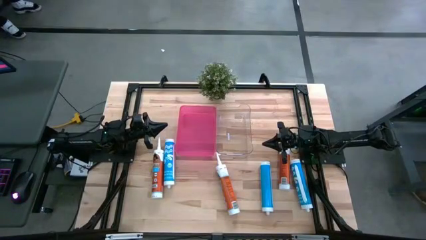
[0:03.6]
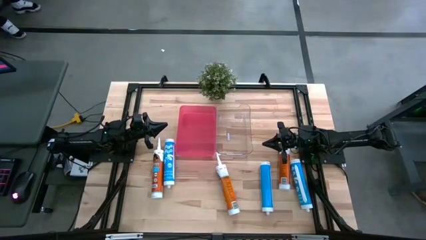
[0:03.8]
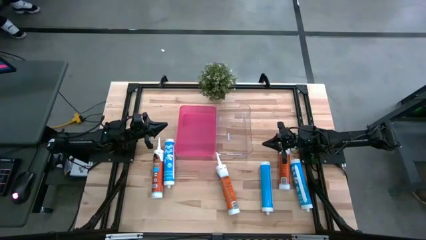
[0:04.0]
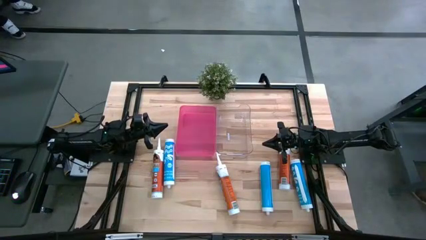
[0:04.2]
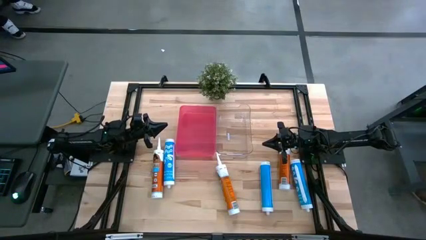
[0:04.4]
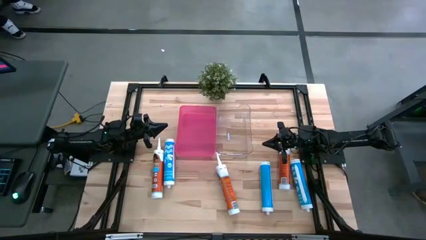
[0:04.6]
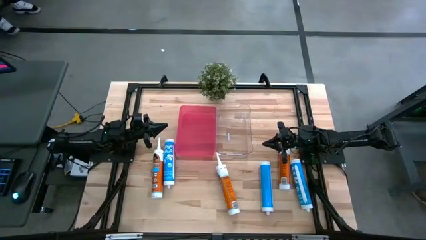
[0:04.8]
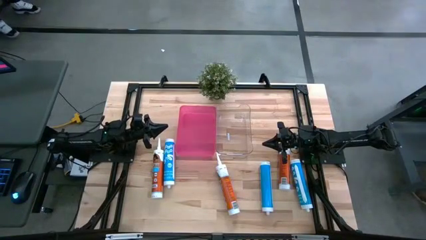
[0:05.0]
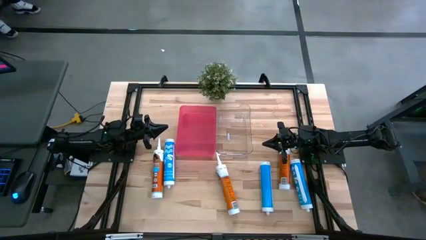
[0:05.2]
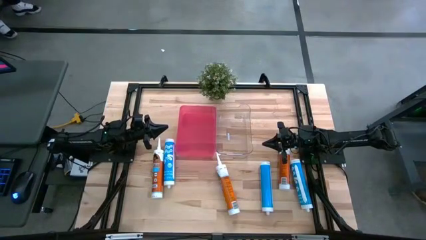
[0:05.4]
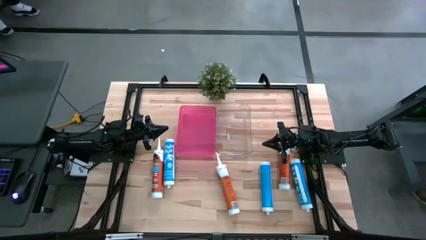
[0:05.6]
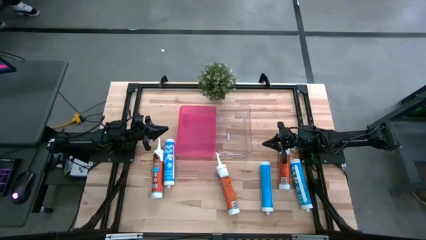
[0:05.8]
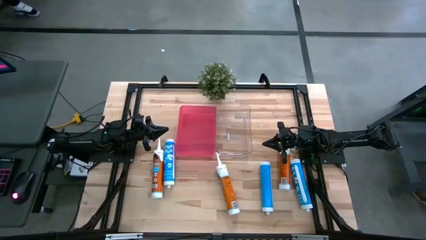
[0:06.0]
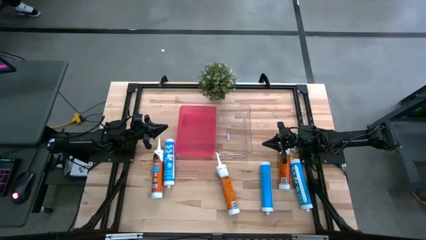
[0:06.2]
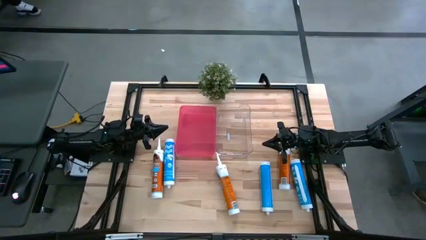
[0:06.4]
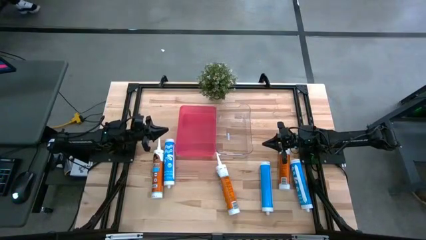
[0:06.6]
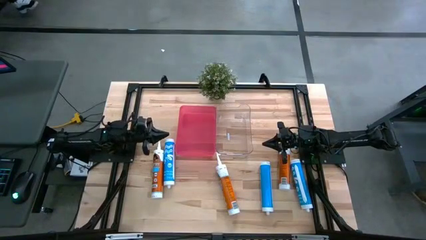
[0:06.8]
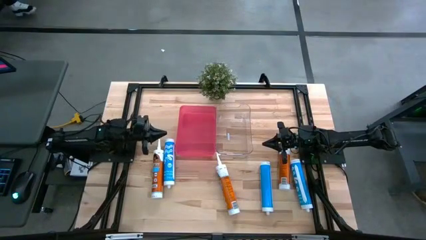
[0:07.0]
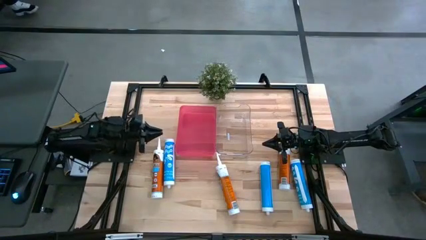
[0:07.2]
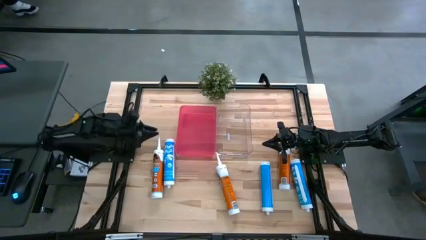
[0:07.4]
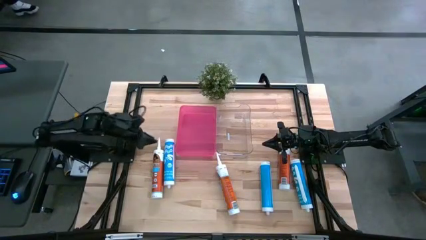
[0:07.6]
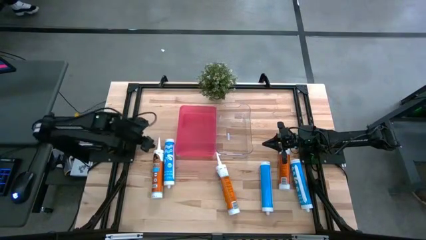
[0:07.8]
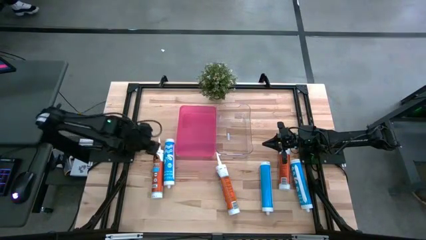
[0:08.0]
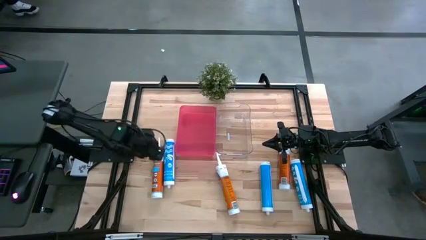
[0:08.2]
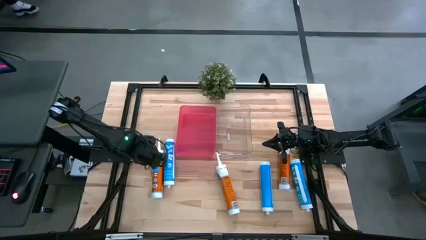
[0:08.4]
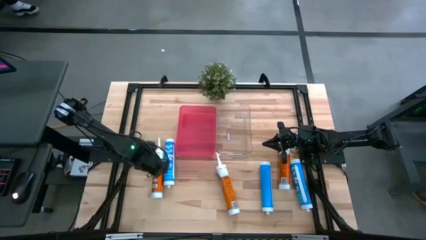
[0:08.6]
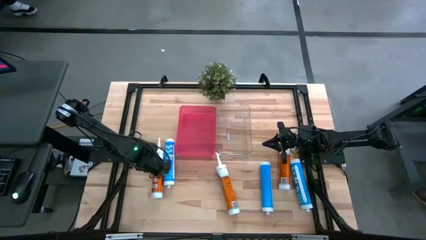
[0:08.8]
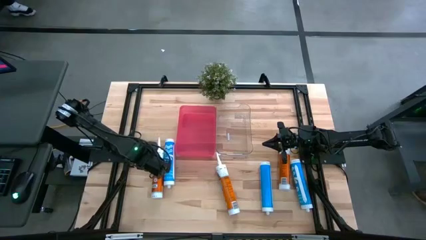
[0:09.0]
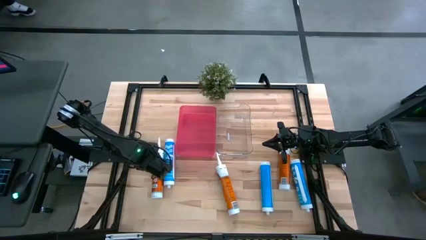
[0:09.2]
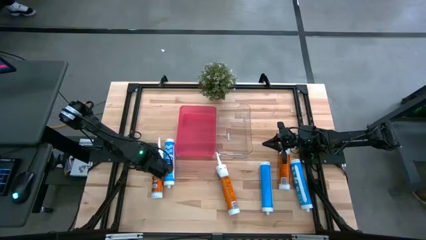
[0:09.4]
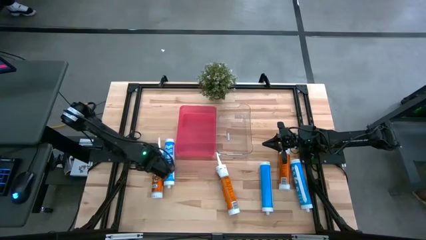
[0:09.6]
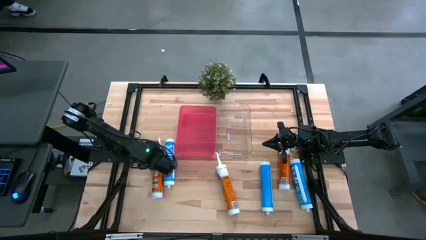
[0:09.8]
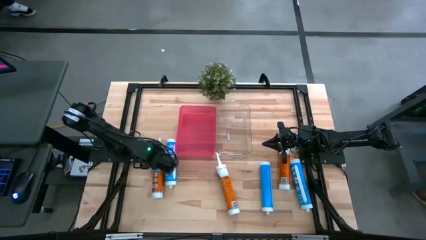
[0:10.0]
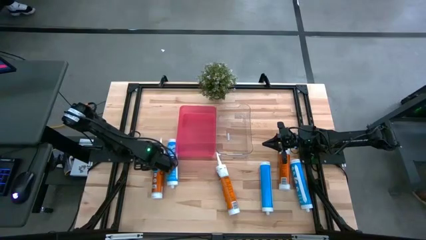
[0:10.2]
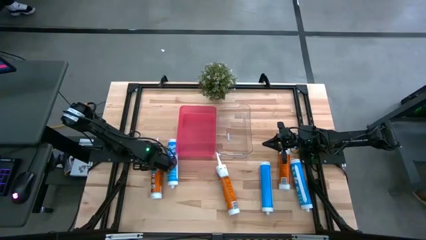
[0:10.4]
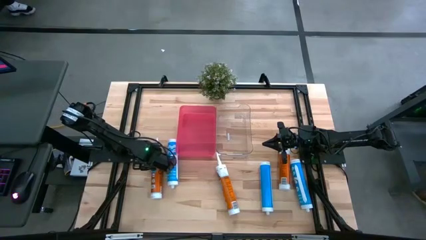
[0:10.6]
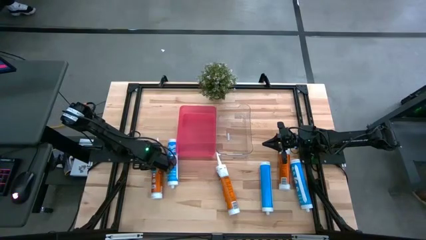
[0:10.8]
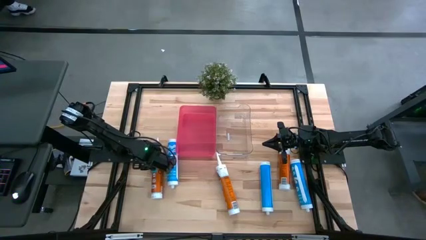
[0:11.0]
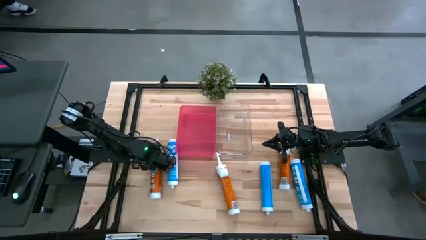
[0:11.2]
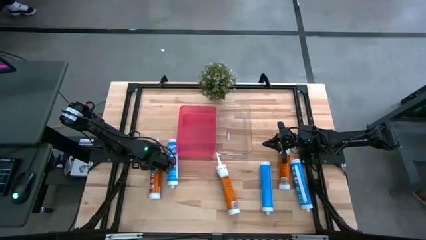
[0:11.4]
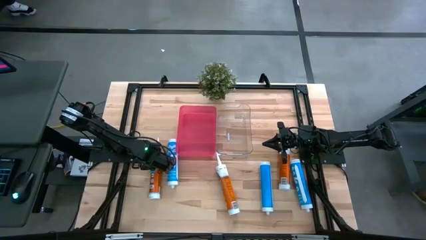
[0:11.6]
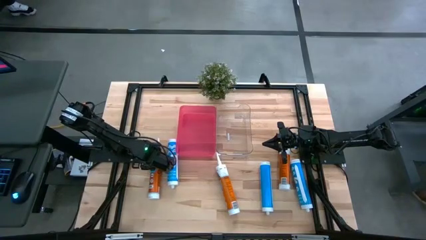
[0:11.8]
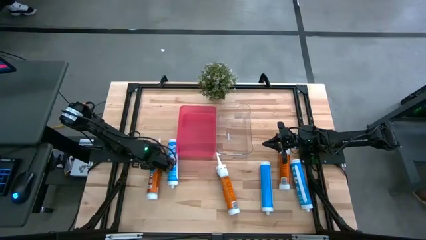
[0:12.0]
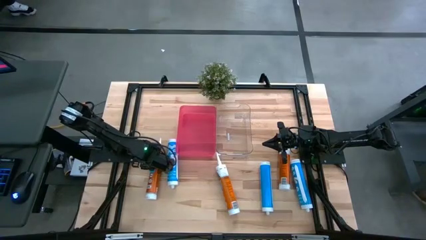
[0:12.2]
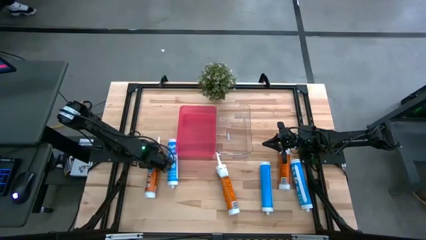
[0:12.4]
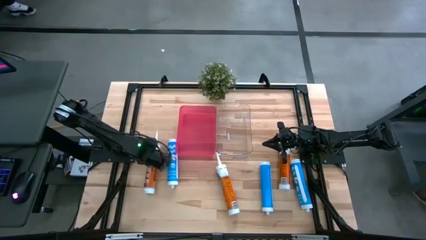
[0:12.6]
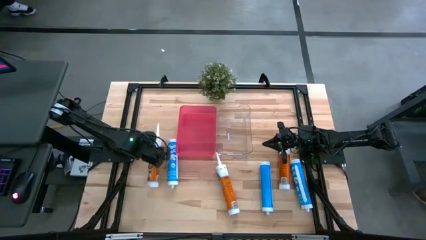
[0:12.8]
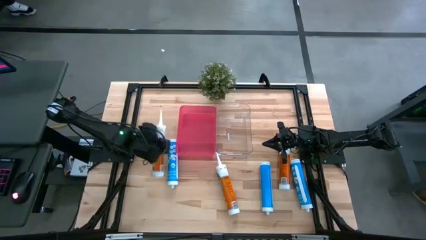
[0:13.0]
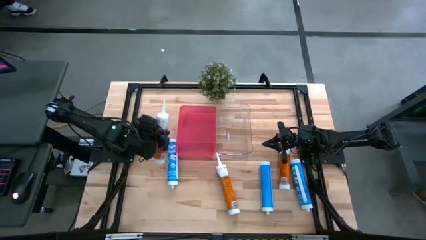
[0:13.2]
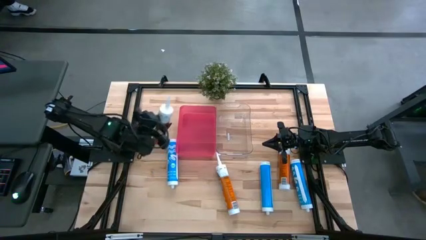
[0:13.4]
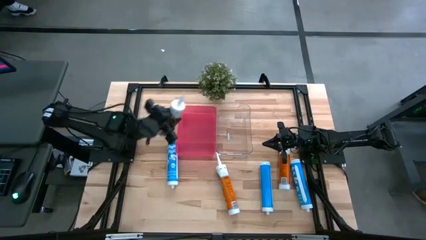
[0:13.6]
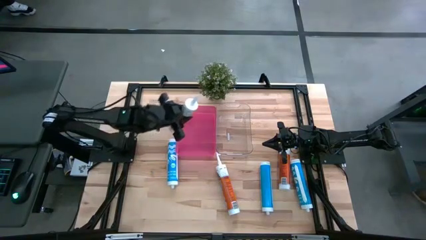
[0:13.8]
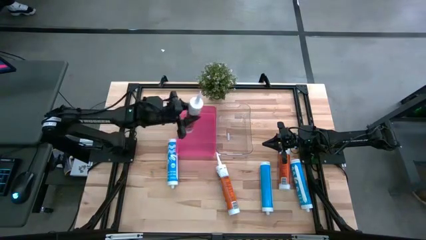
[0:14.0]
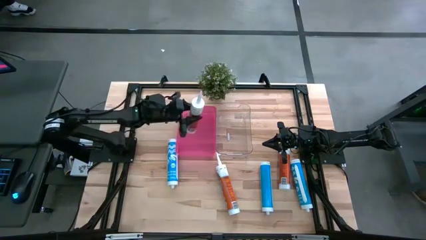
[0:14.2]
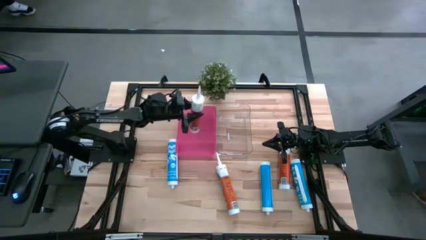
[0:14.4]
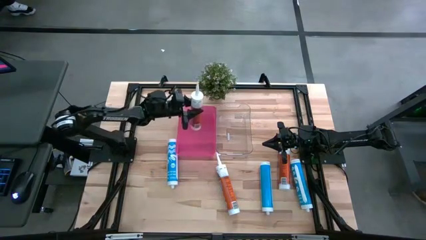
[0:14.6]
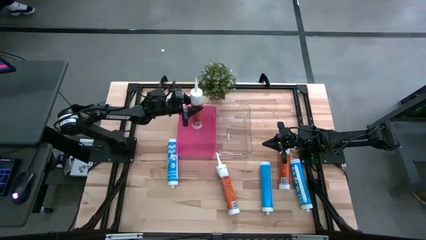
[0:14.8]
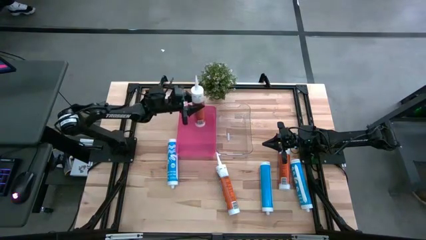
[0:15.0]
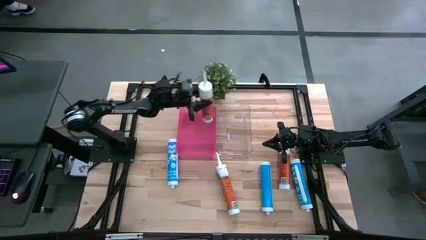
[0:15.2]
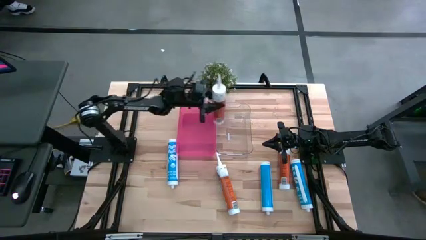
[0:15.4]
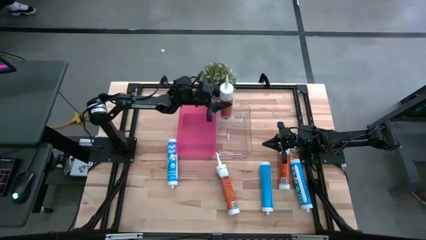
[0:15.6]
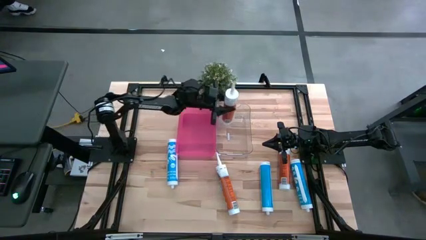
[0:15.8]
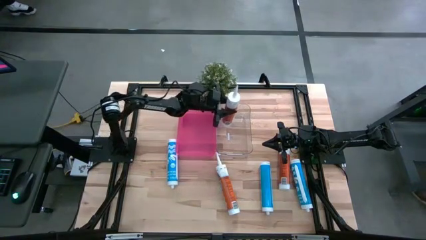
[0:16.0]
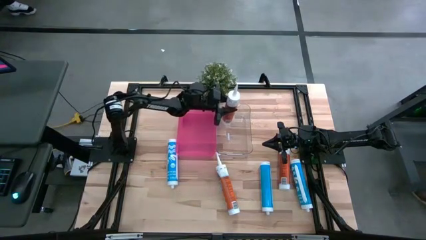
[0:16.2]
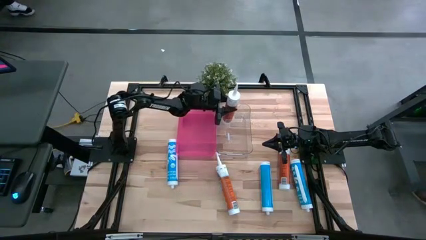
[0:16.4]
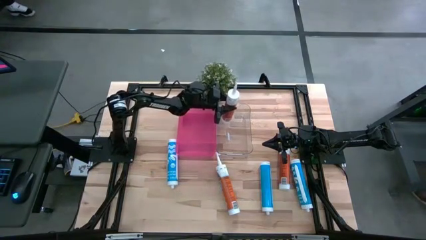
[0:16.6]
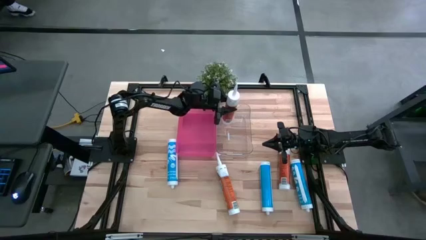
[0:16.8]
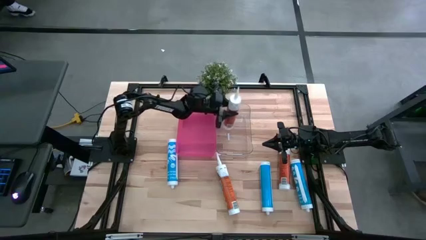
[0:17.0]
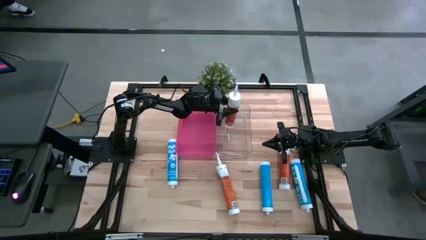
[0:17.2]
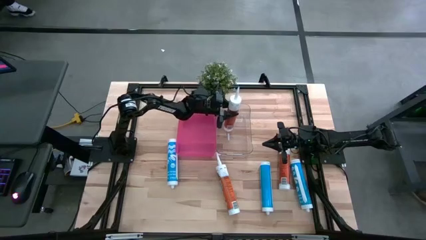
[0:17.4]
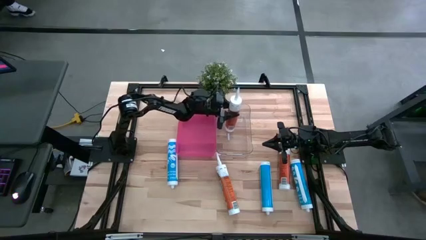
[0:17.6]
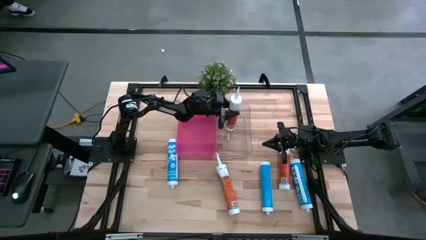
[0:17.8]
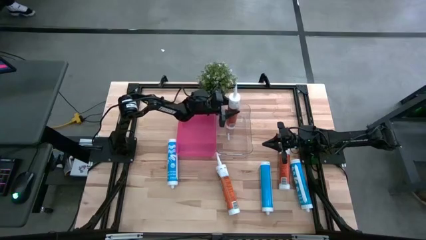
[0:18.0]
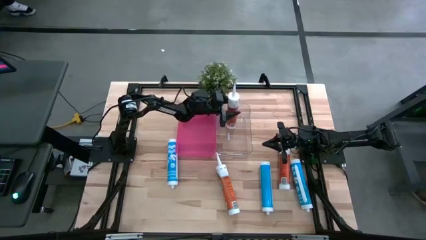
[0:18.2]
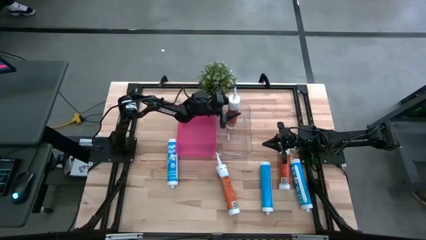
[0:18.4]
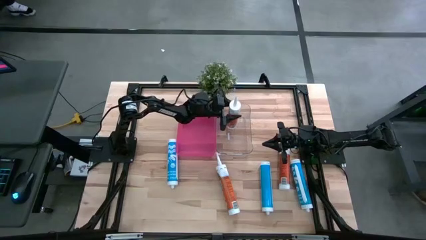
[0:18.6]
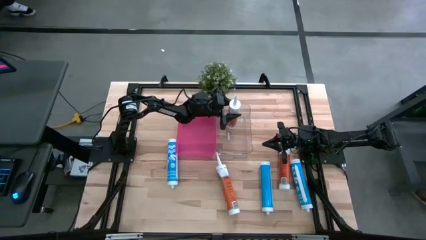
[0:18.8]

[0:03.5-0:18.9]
Task: Pick & place silicon tubes, Sealant and Lysol wipes
Put the left orange sealant into the transparent bin
